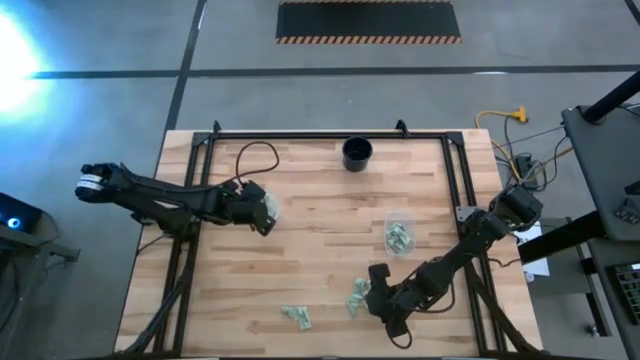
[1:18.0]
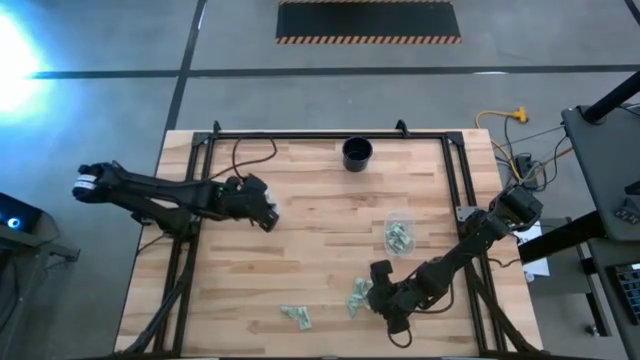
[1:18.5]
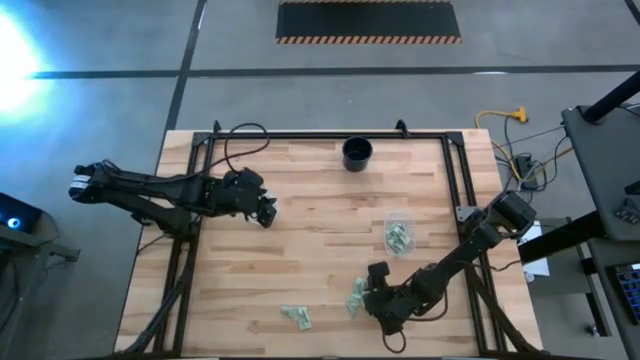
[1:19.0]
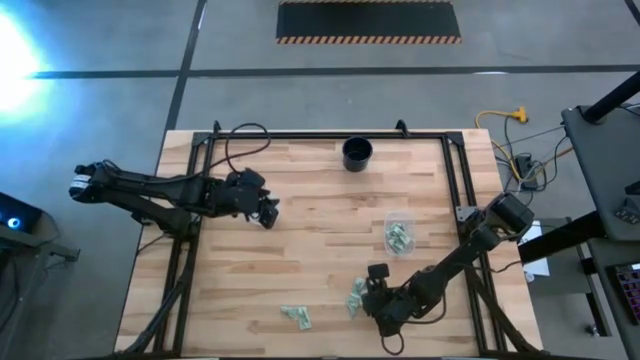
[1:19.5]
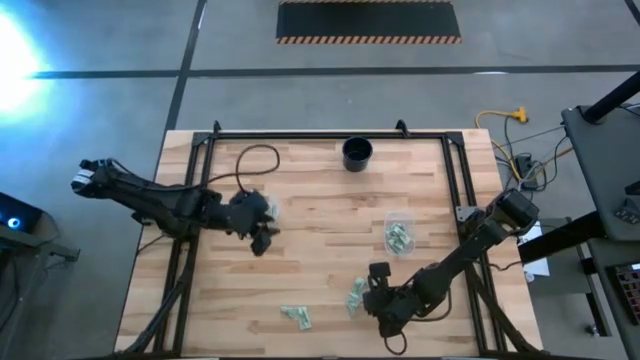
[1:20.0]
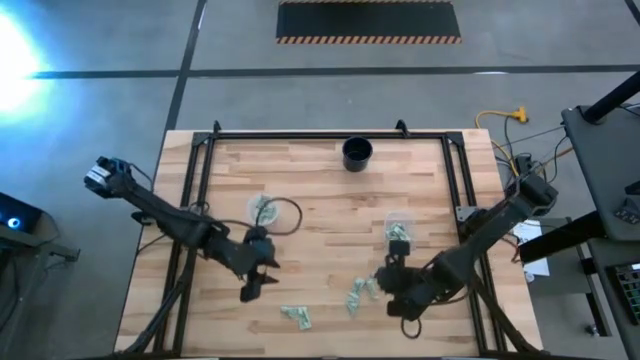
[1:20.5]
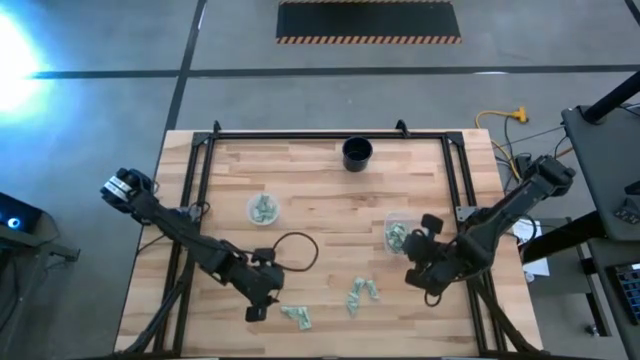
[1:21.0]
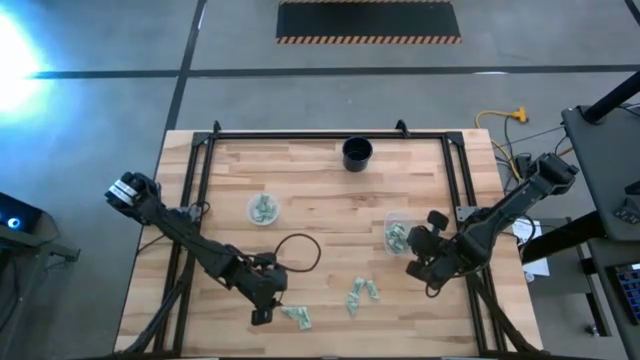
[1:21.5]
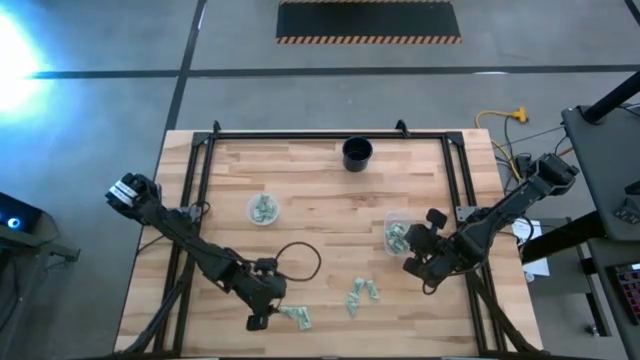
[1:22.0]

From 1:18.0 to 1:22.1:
Task: Pick and place items into bin
Put the white sweetener packet into the right transparent bin

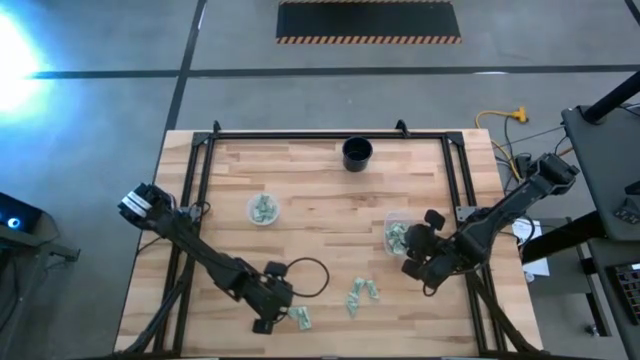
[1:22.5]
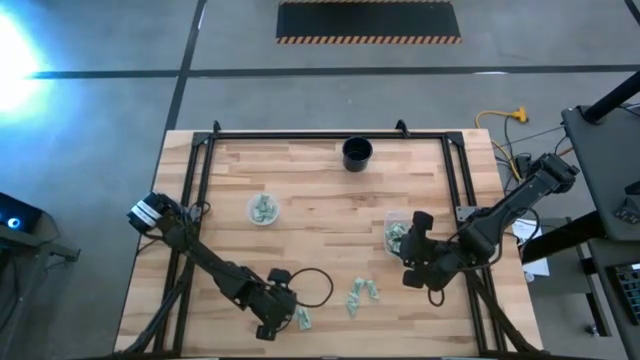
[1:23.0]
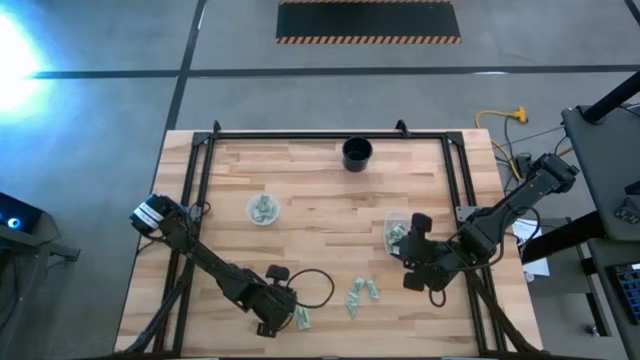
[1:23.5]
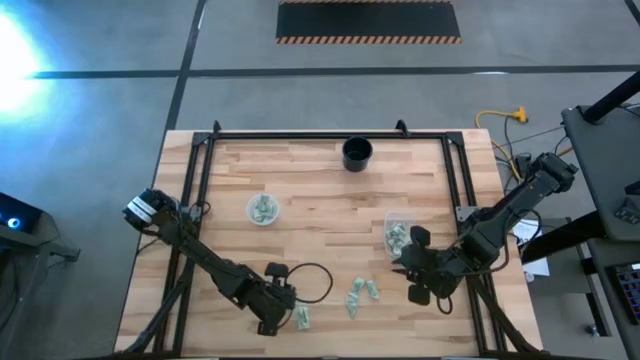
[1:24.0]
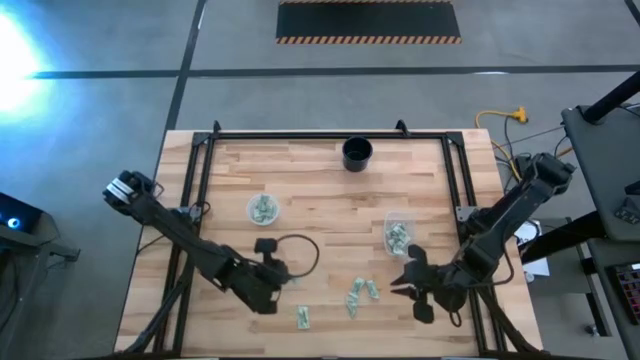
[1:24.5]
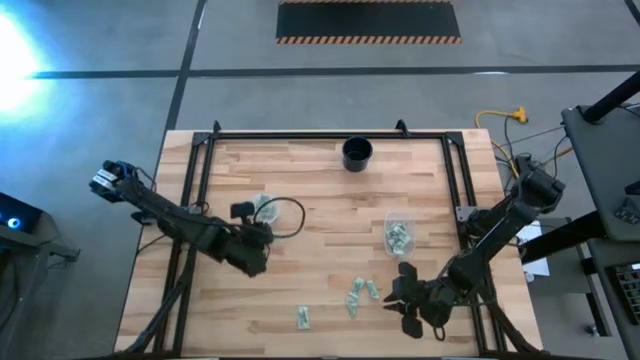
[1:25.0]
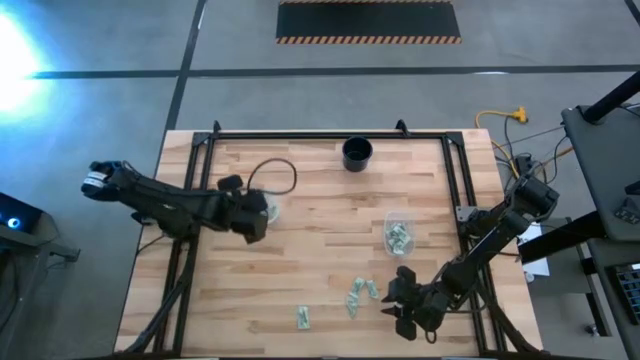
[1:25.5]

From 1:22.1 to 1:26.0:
Put the white sweetener packet into the left transparent bin

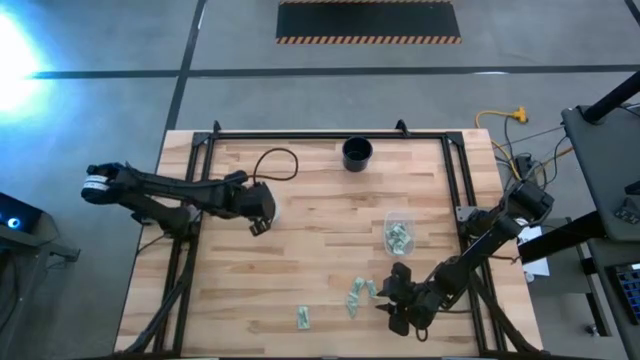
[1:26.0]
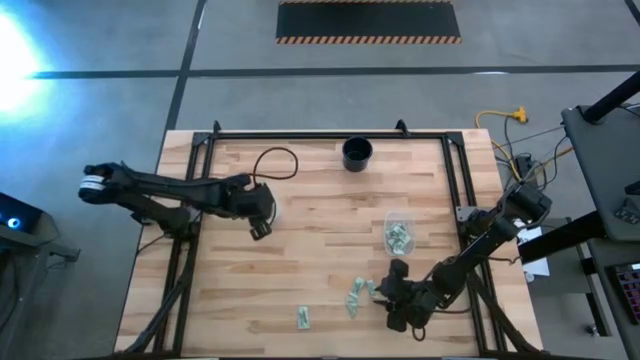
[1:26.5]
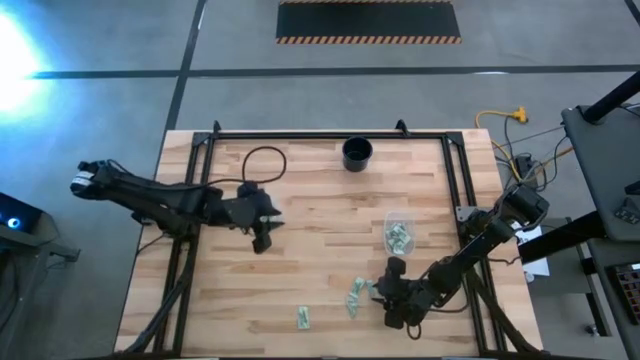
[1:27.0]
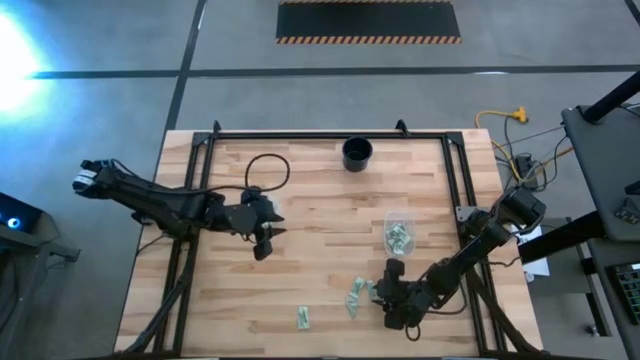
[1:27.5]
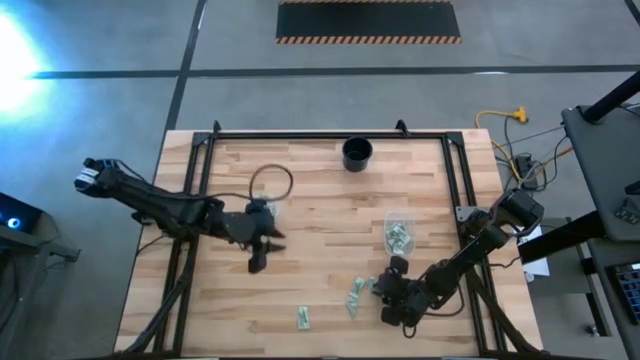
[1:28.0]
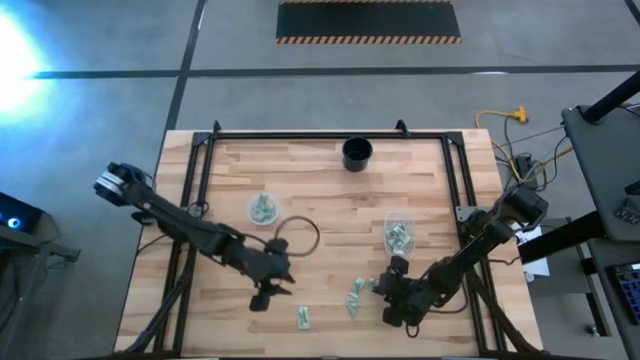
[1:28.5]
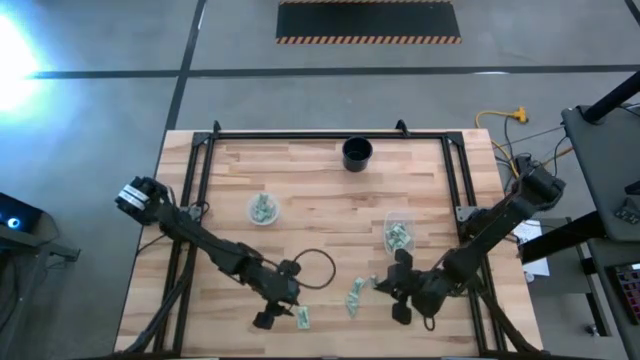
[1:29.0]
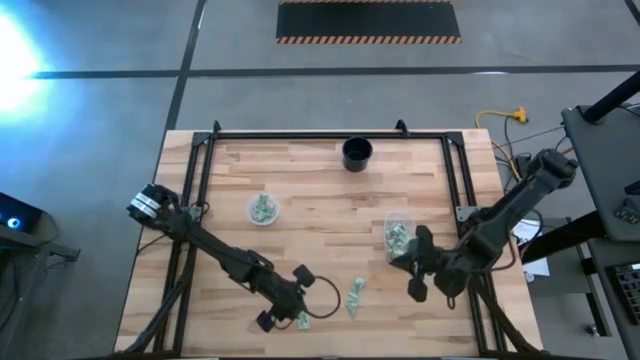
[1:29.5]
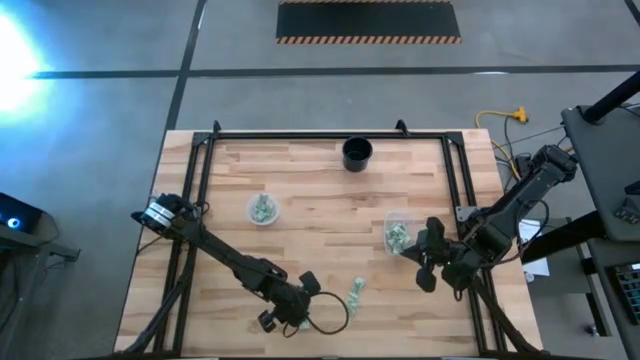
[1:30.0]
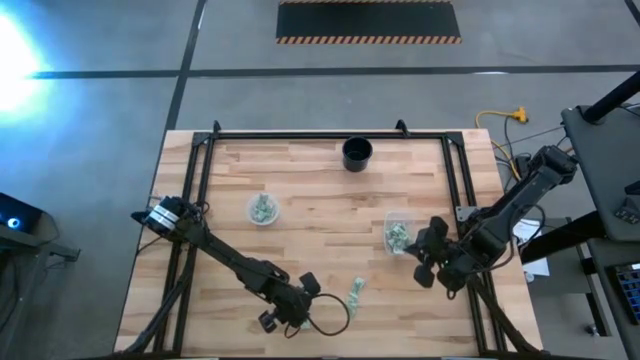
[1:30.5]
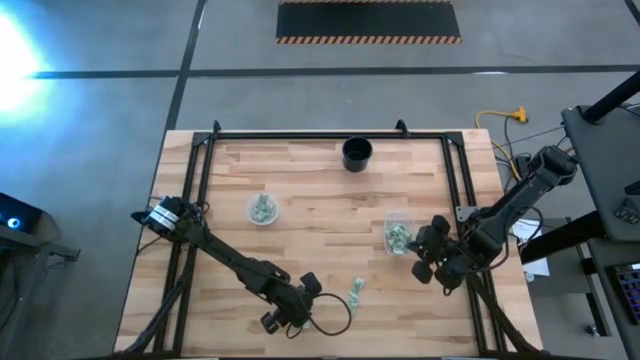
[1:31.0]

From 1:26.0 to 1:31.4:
Put the white sweetener packet into the right transparent bin

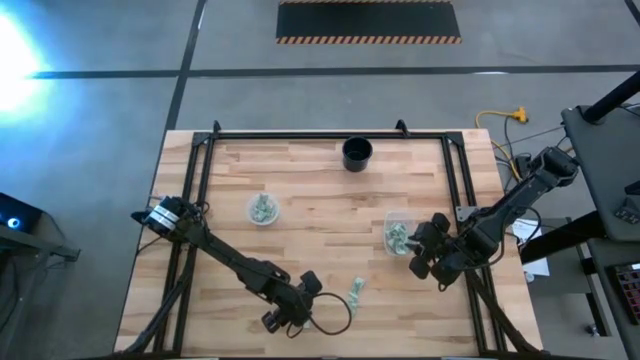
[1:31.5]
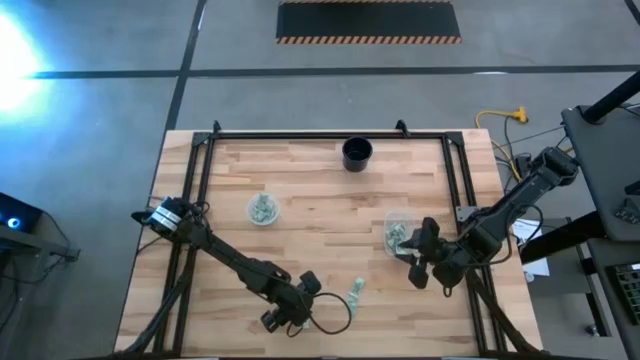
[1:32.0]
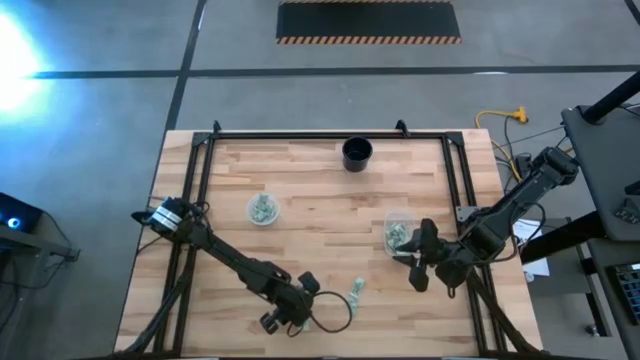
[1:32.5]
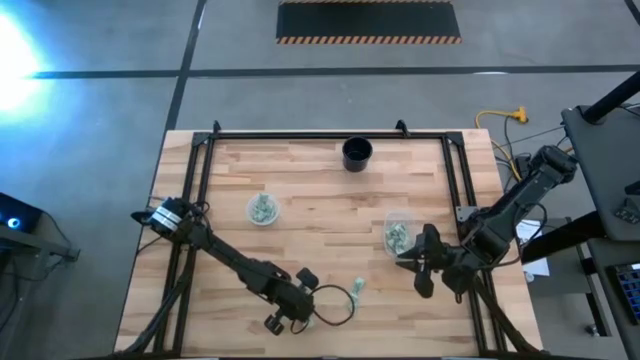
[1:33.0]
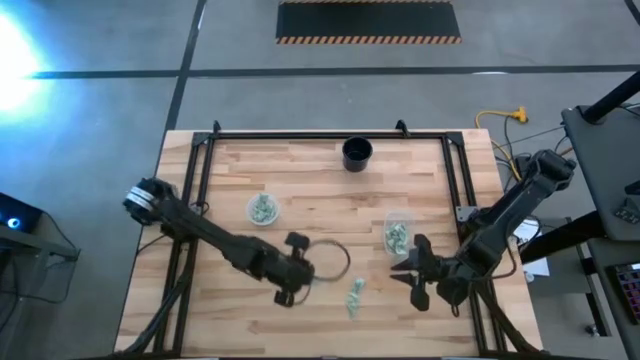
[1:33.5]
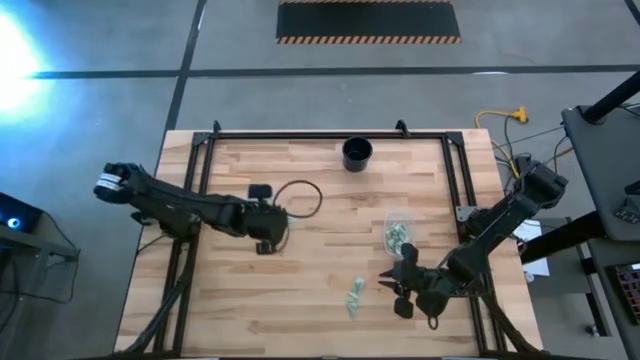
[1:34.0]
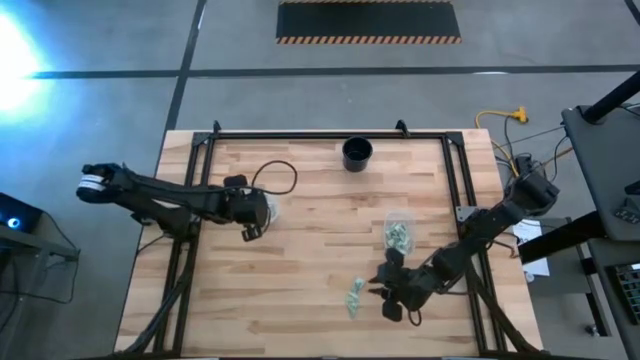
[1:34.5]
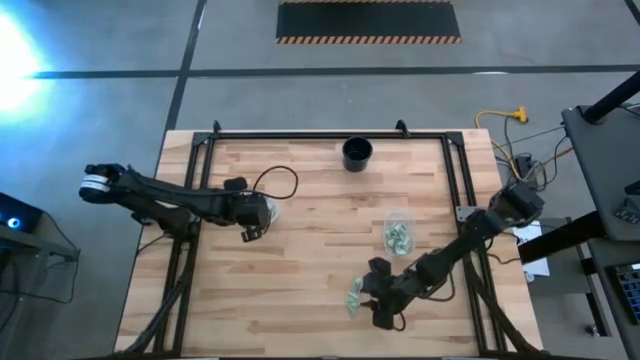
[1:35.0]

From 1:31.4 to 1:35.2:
Put the white sweetener packet into the left transparent bin

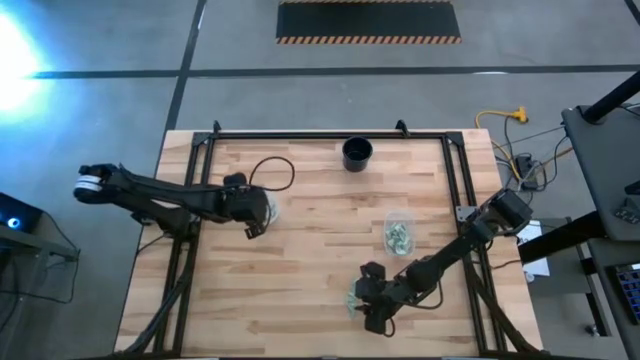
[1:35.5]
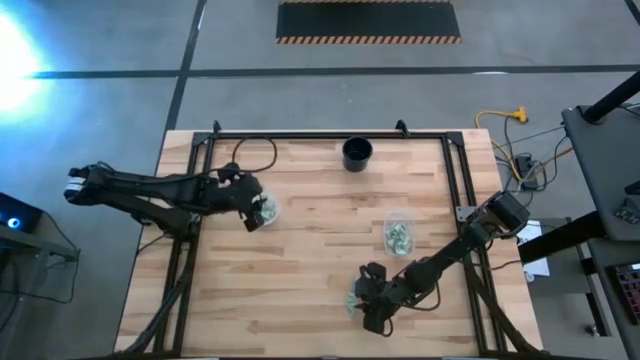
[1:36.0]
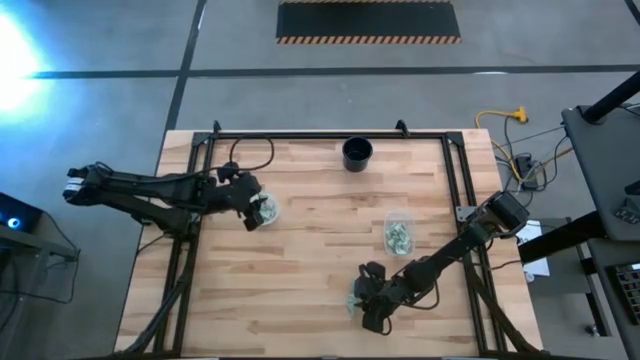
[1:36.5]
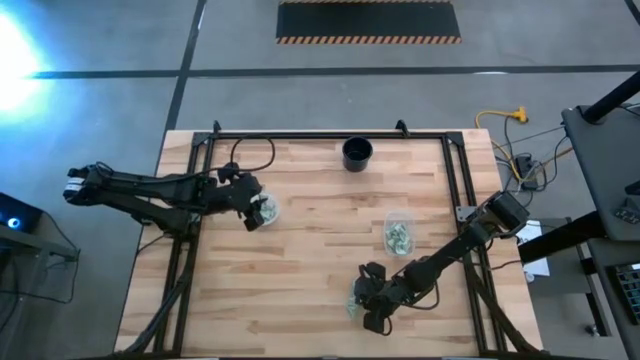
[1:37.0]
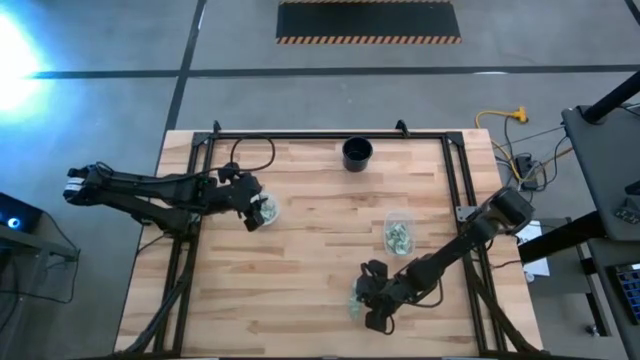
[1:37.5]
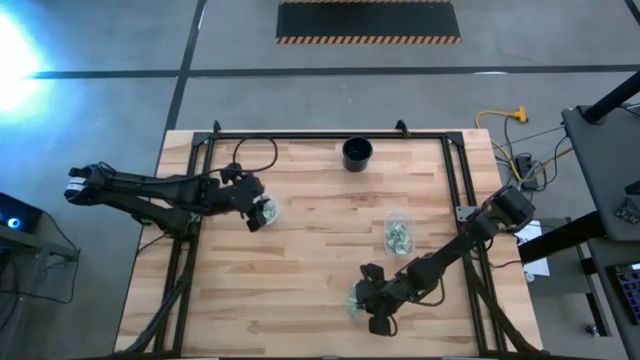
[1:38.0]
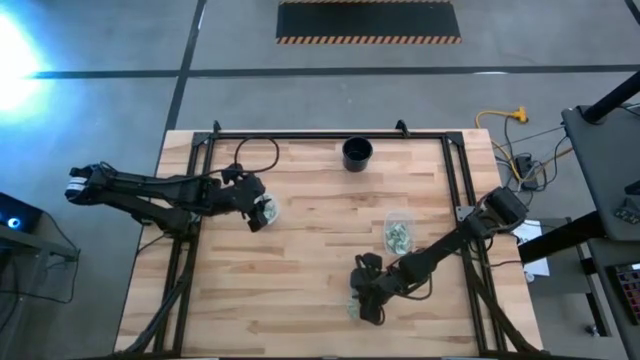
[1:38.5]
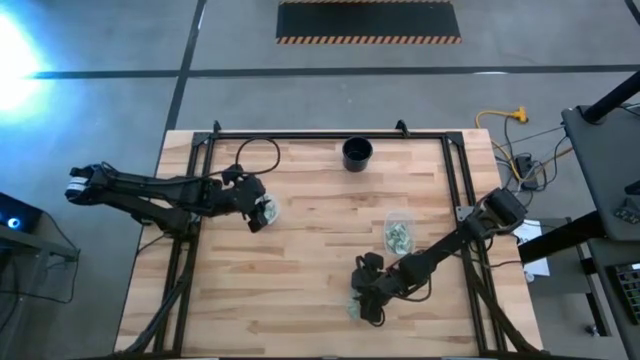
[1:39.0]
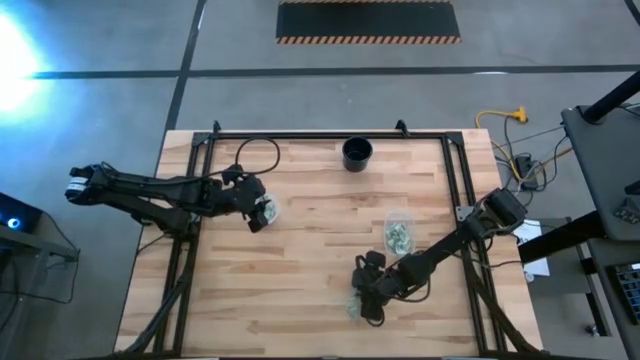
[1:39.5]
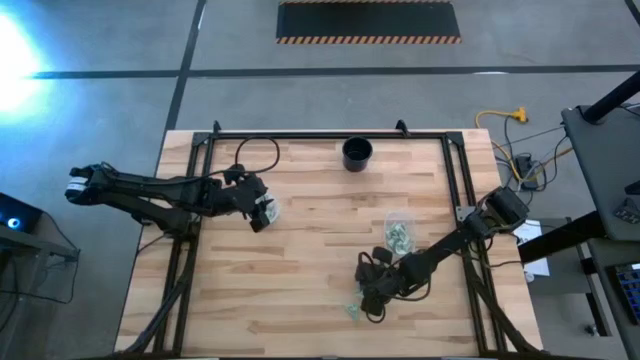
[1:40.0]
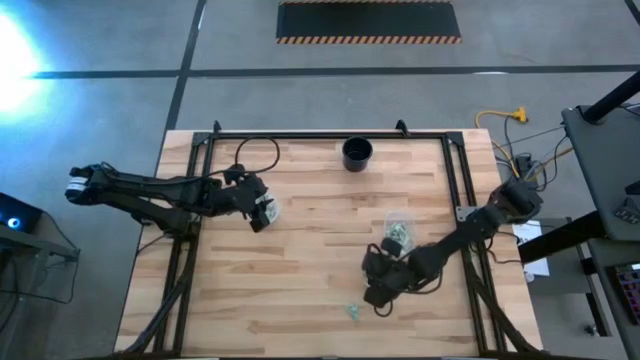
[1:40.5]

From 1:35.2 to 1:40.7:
Put the white sweetener packet into the right transparent bin
